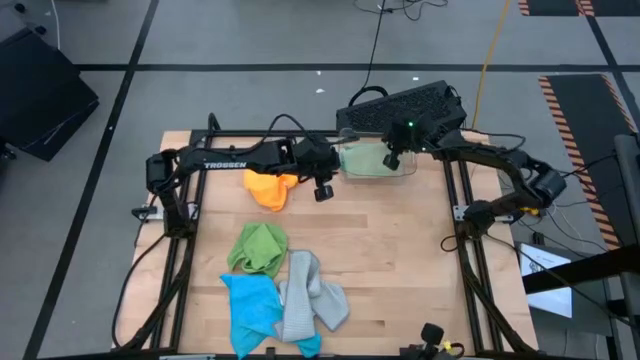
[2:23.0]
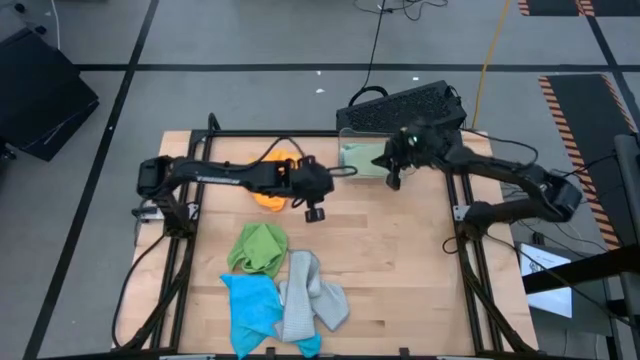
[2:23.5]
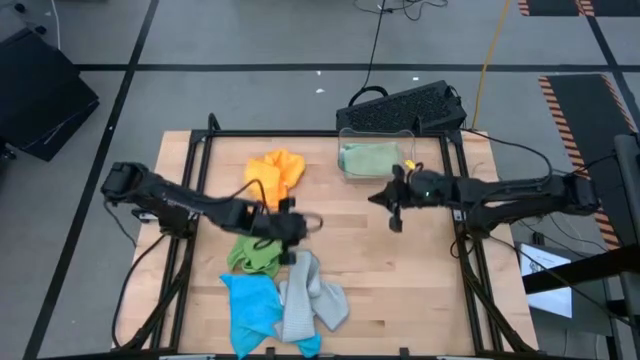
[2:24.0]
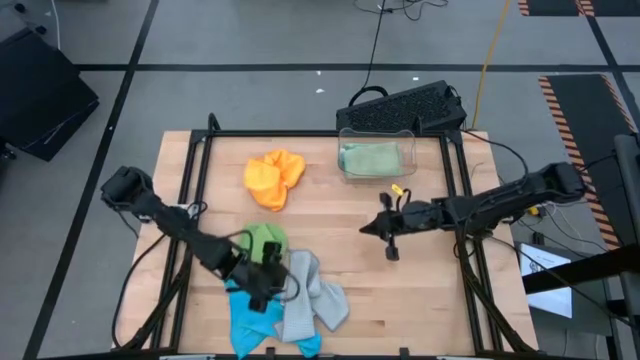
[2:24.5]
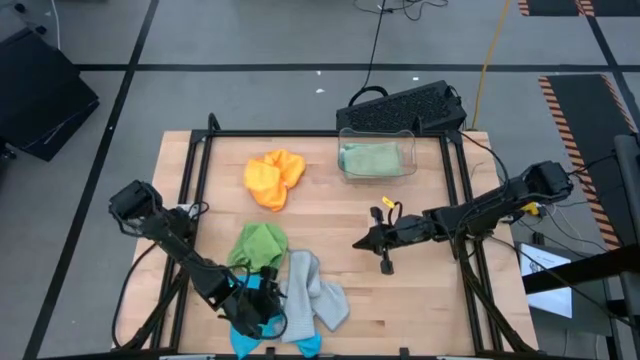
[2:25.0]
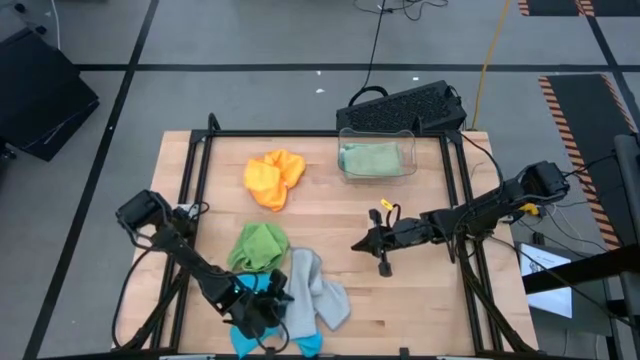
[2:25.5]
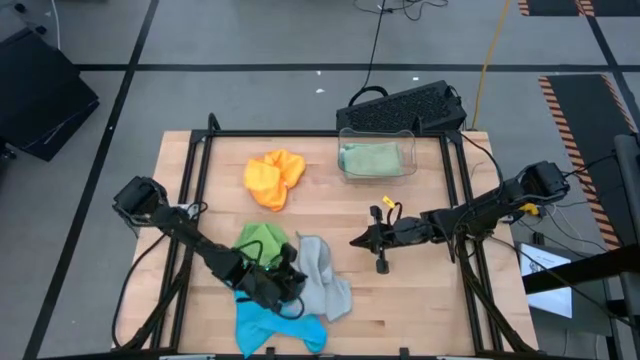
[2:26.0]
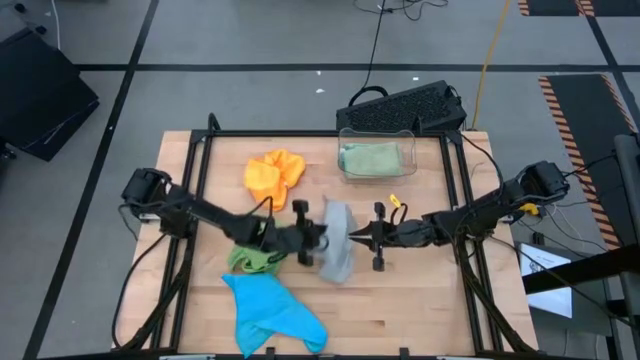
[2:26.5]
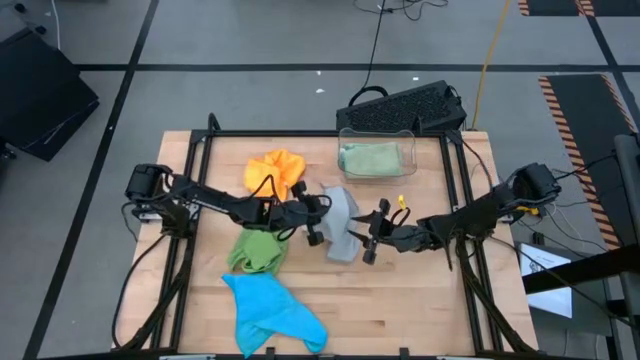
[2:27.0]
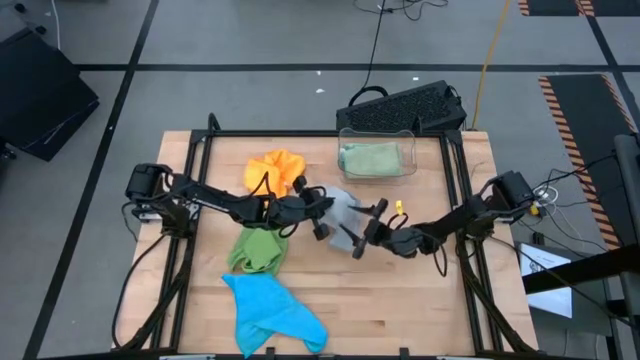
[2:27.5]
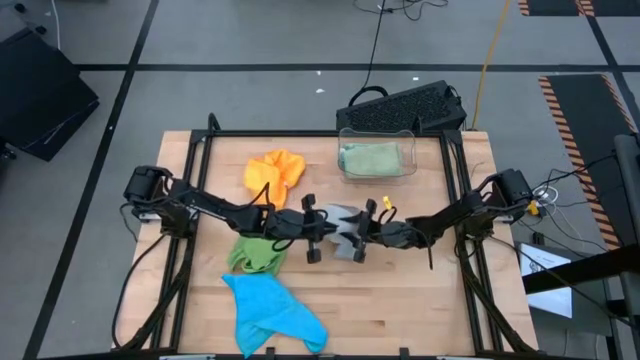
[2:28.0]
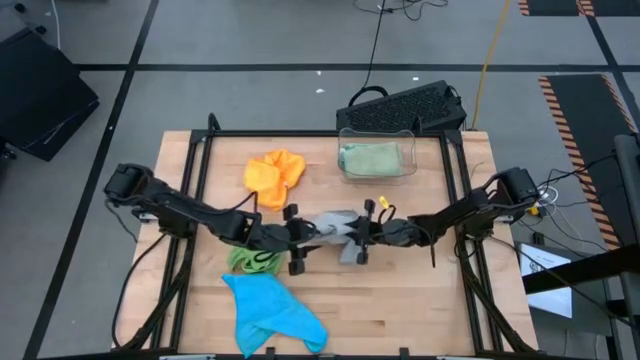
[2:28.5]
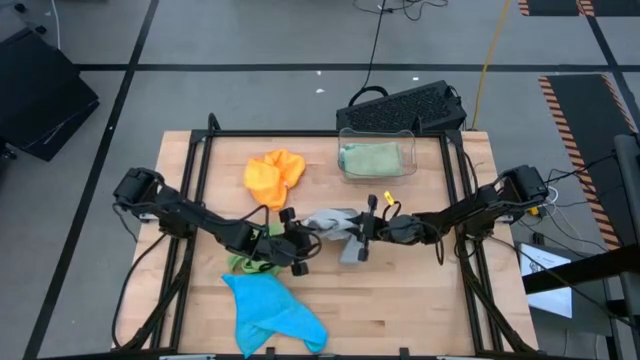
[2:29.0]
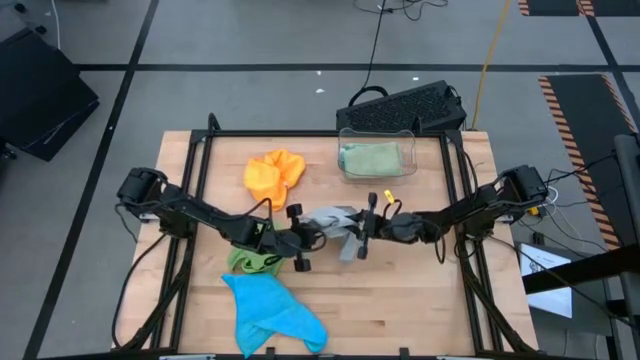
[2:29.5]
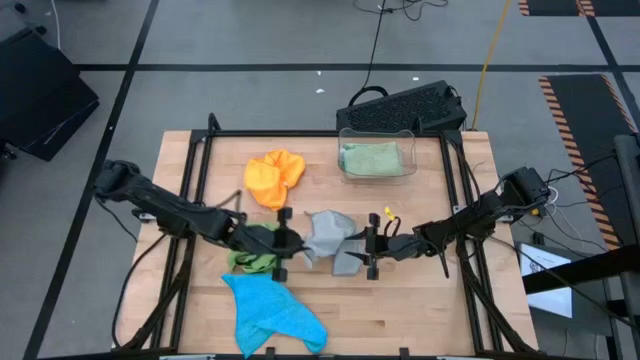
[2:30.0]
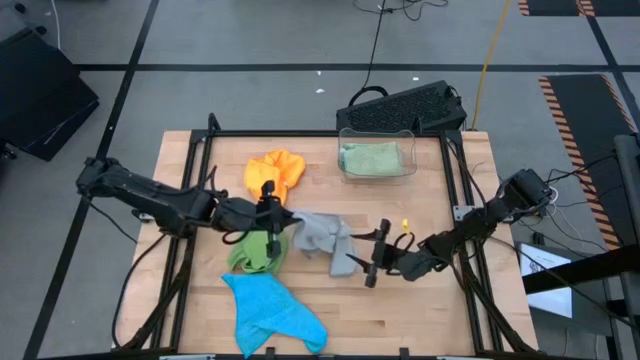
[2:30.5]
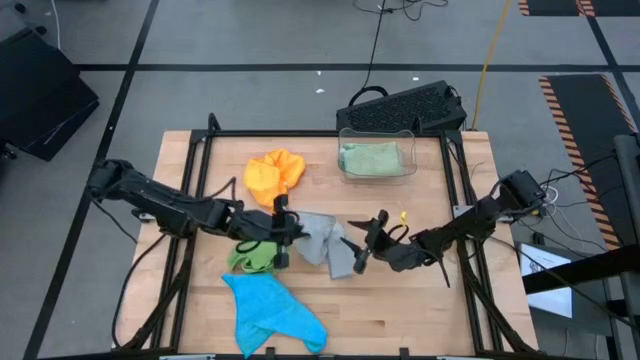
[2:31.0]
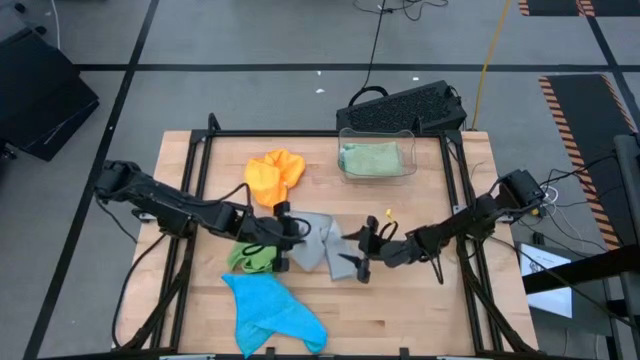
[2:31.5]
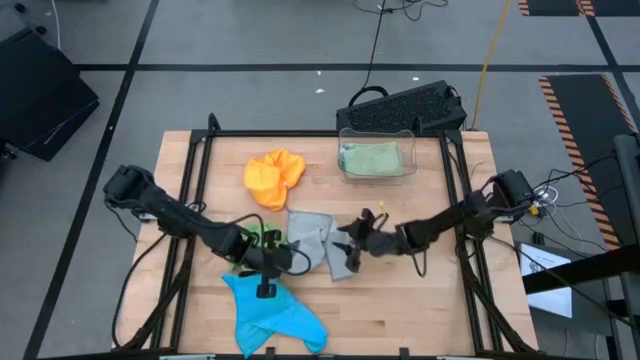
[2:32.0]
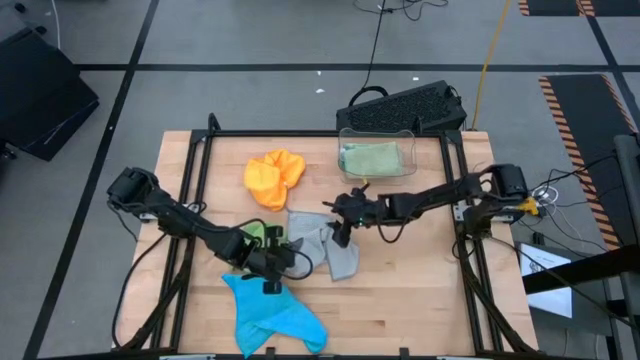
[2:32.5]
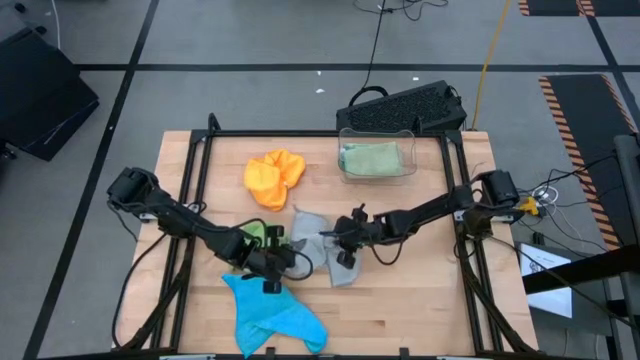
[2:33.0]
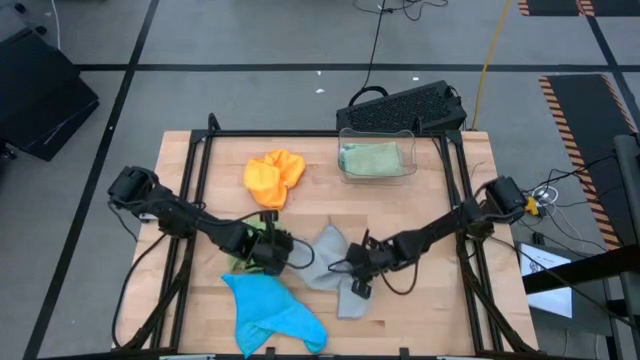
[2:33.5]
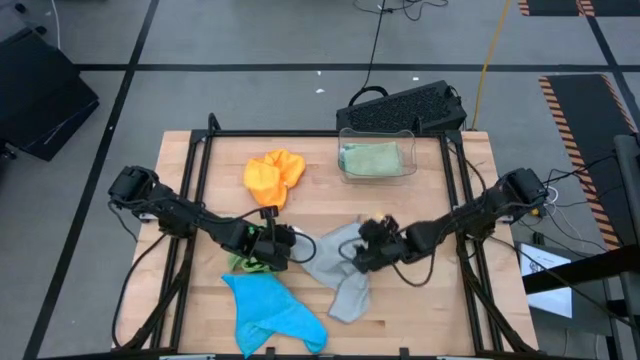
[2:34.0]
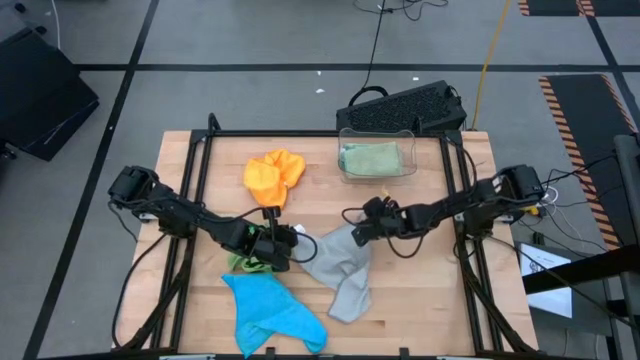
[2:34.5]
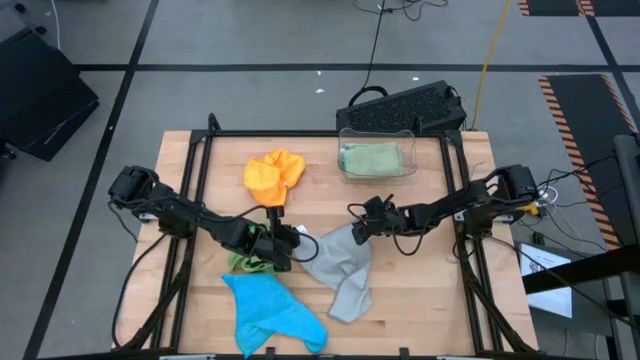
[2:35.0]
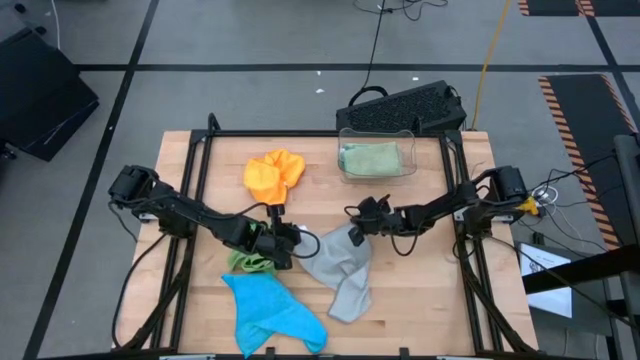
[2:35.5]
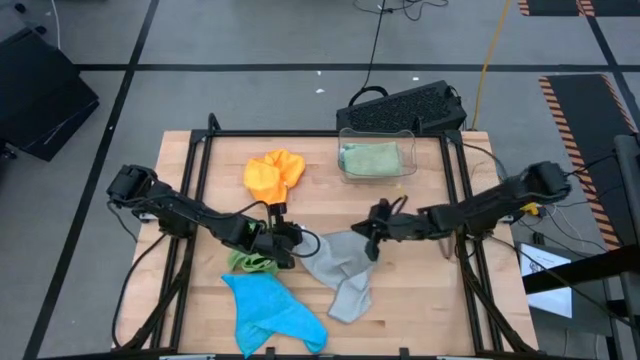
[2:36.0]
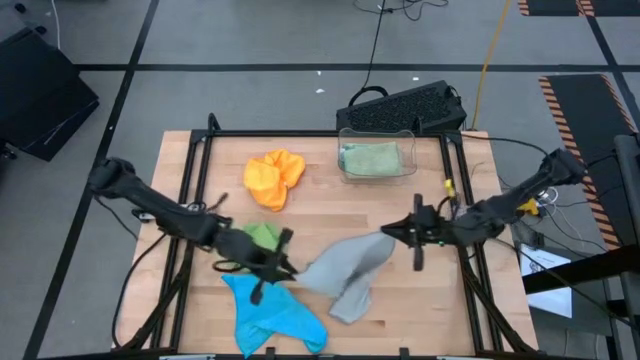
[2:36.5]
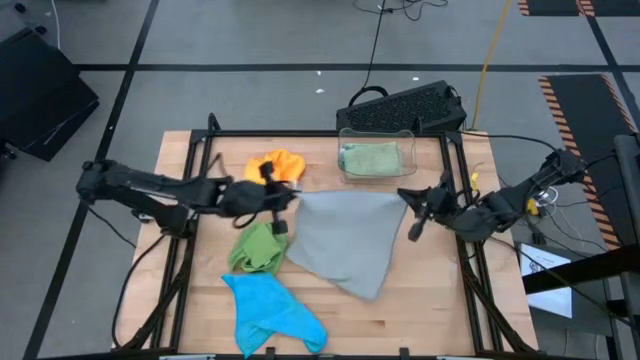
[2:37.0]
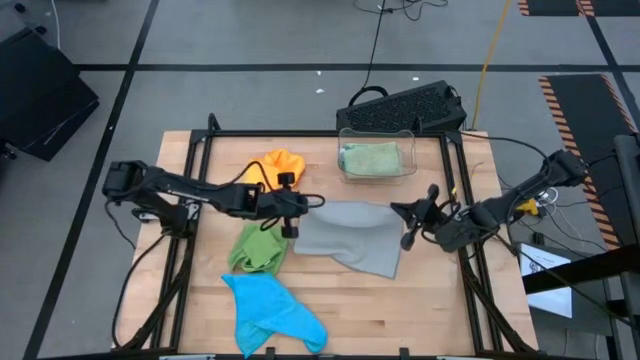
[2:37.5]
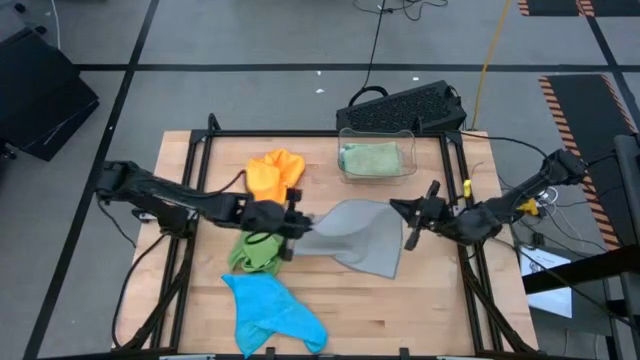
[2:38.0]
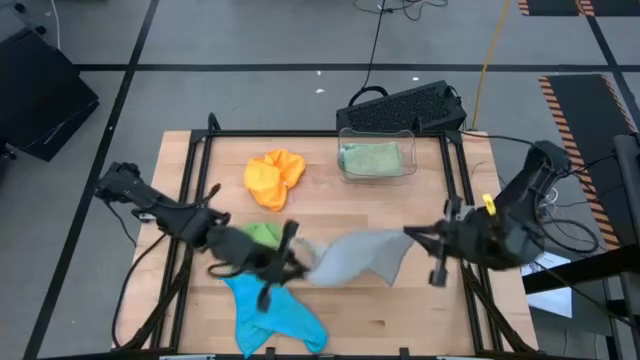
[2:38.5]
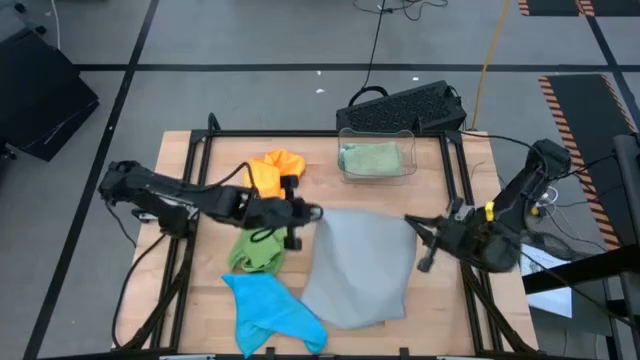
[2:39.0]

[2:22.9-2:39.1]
Task: Fold microfiber towels
Fold the gray microfiber towel

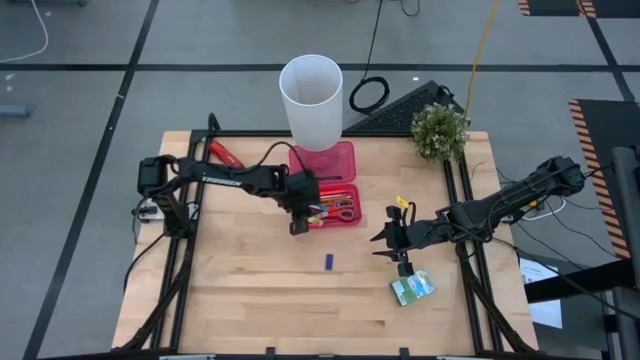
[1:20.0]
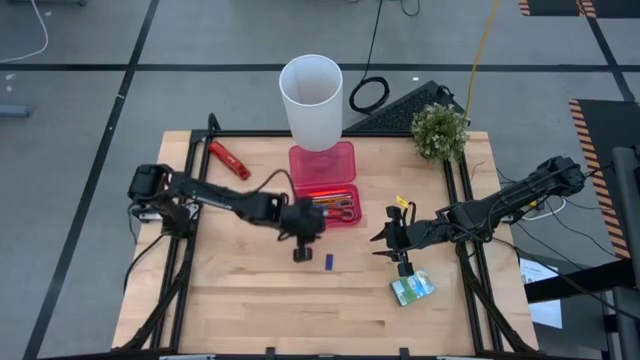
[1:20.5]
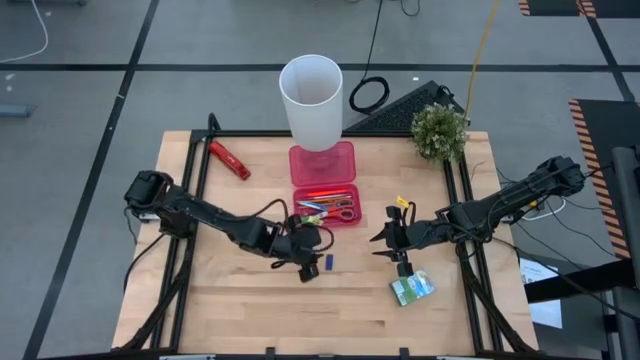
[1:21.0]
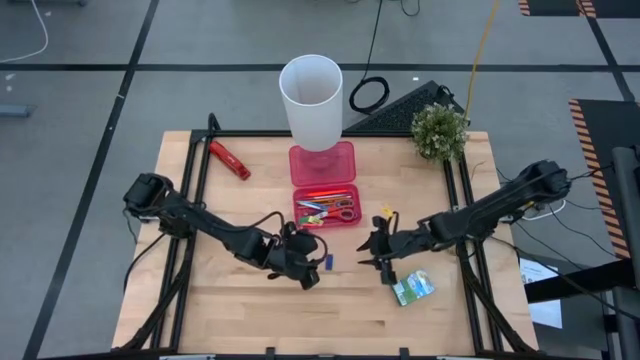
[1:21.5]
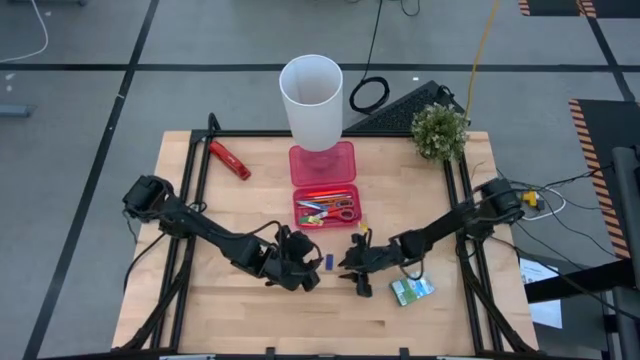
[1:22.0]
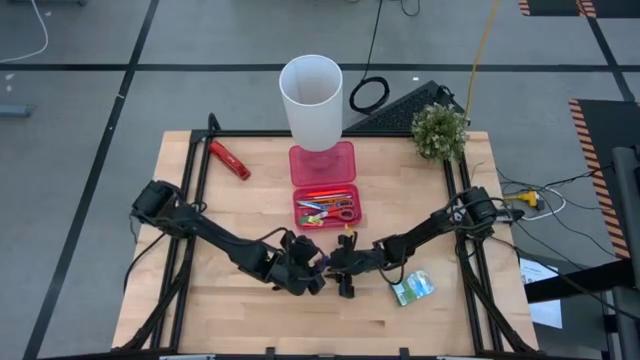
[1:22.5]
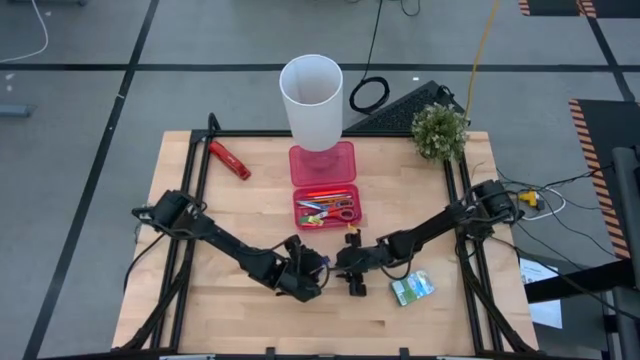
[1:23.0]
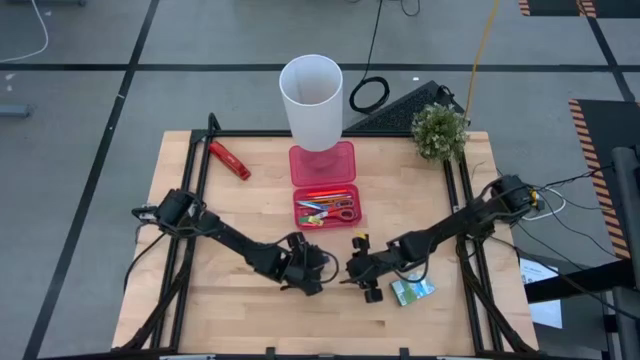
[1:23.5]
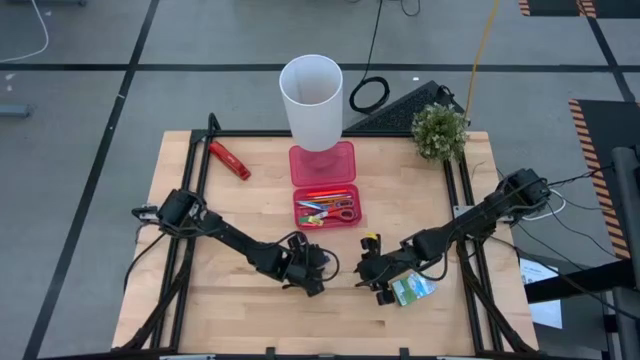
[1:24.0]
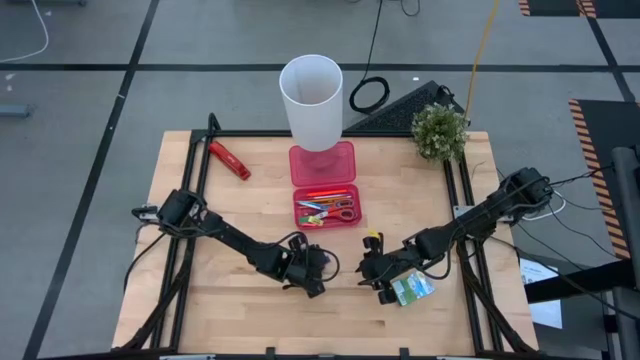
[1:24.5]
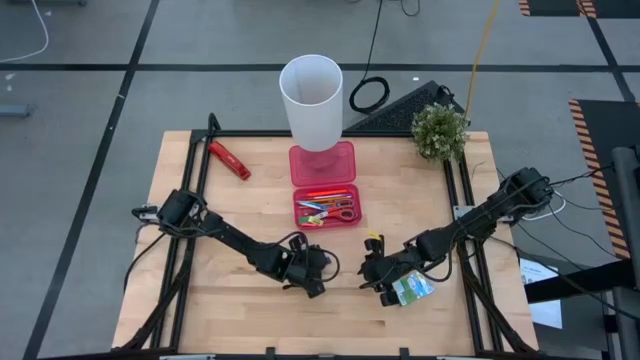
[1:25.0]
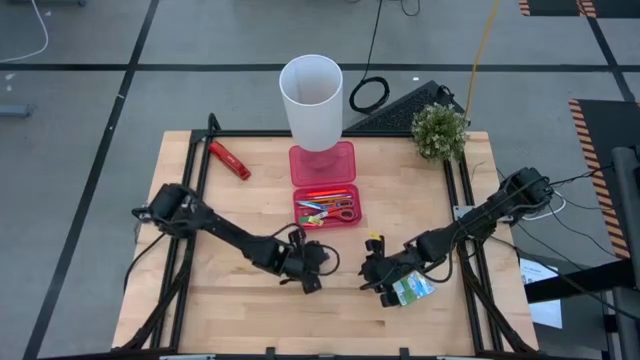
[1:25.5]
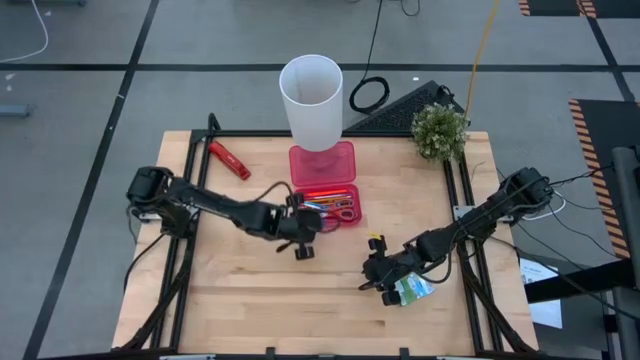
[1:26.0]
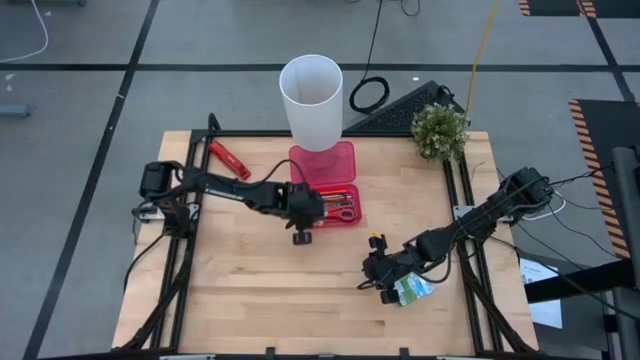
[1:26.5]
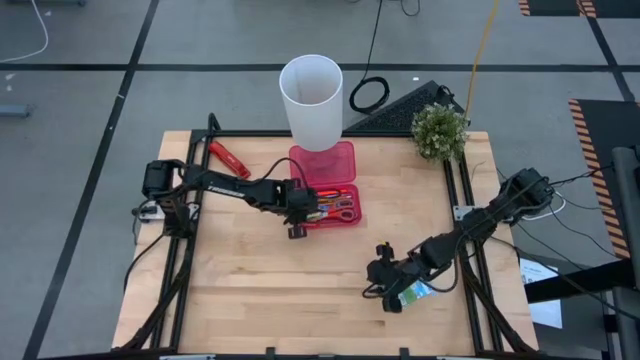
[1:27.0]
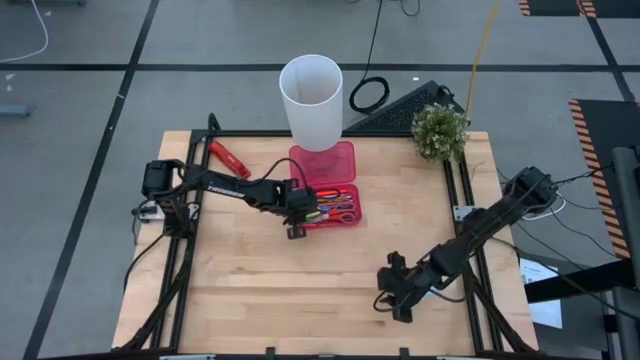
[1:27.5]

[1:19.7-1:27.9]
Task: Pack school essentials
Put the blue eraser into the pink supply box
